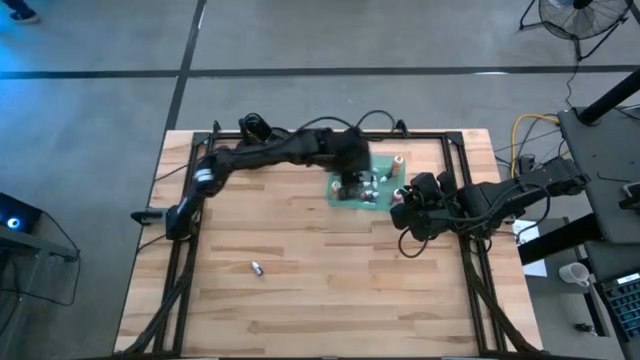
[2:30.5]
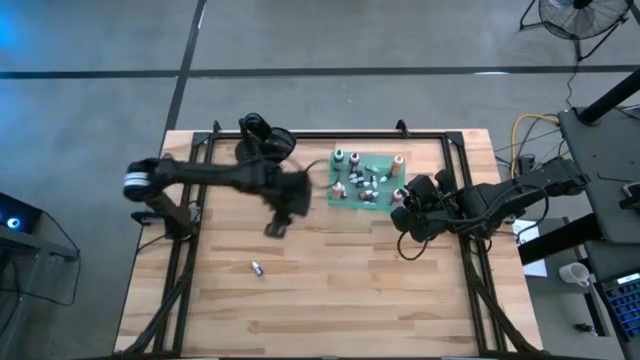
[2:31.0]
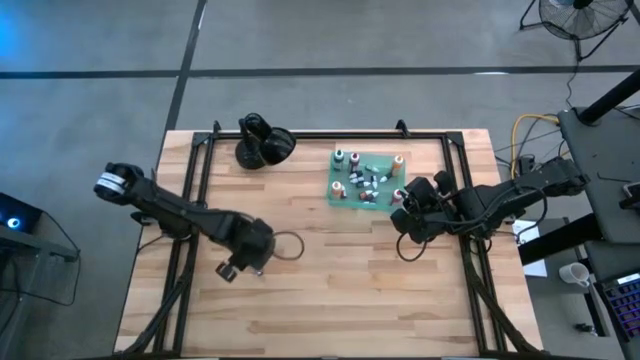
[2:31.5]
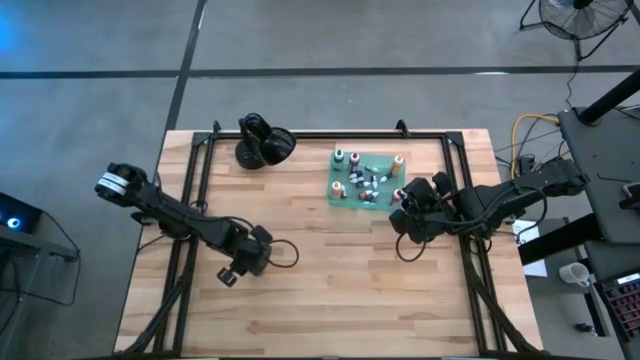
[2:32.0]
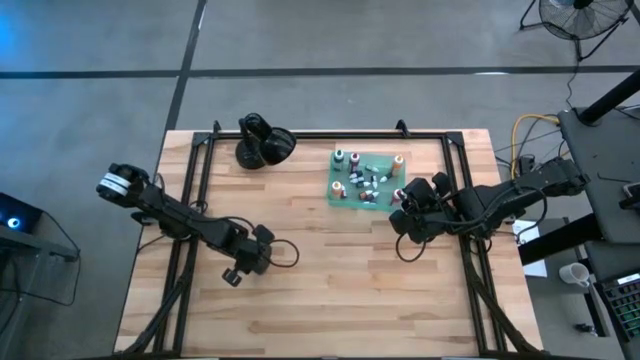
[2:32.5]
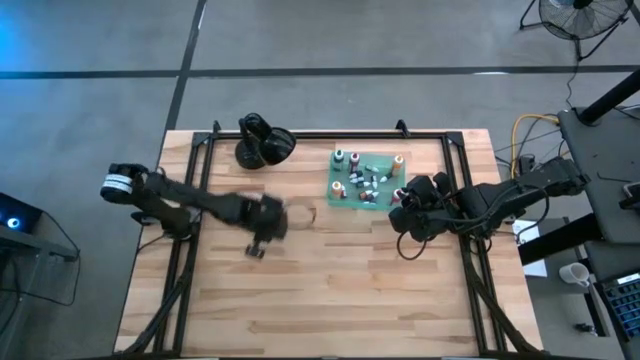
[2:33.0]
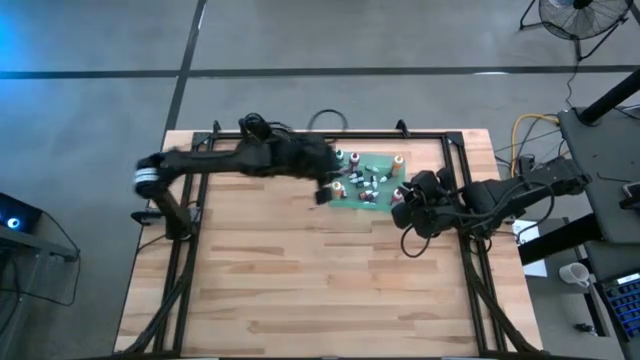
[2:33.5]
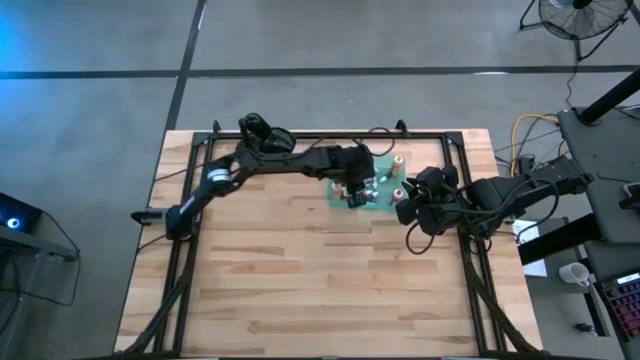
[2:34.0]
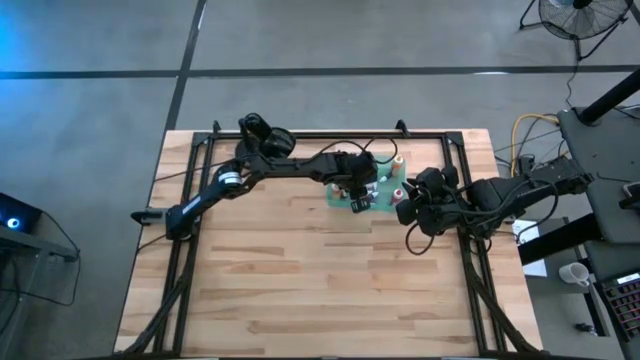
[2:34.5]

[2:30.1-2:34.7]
Task: Pick & Place food coloring
Put the pink food coloring bottle into the green bin

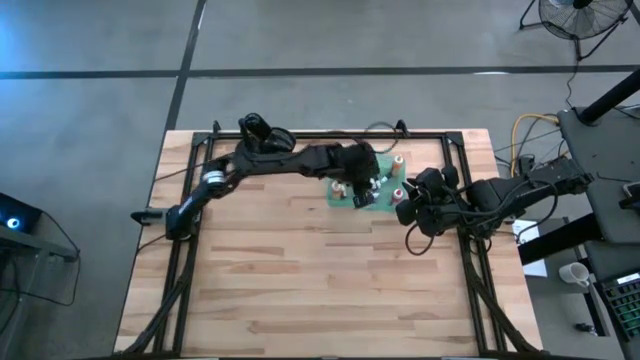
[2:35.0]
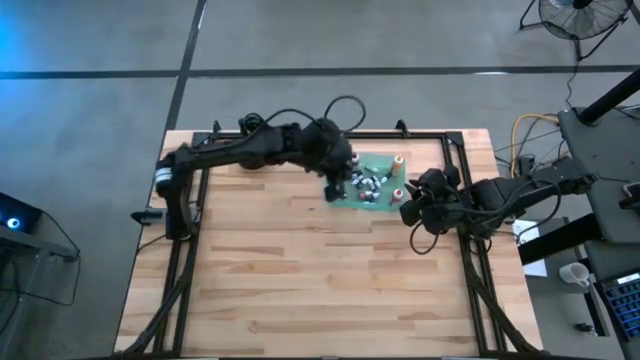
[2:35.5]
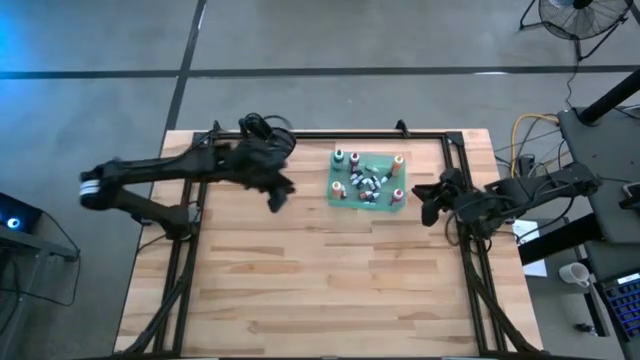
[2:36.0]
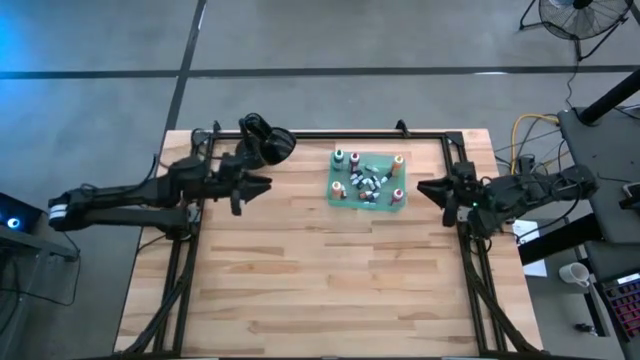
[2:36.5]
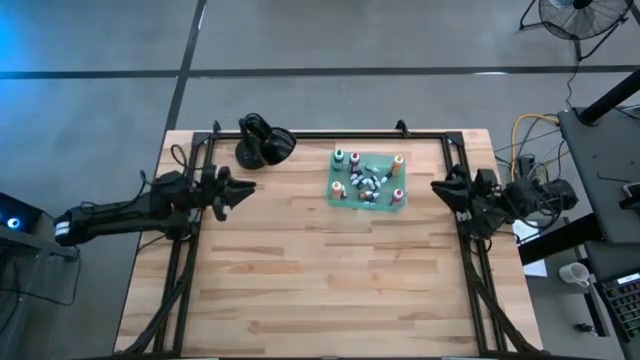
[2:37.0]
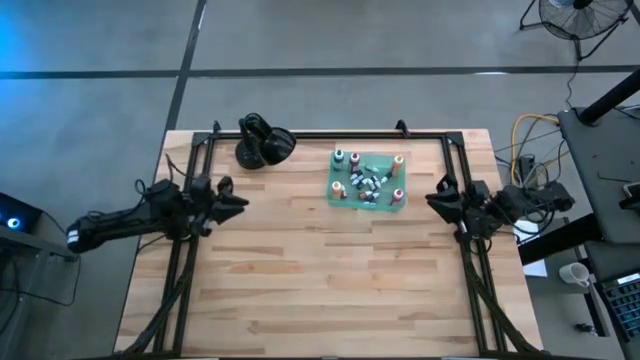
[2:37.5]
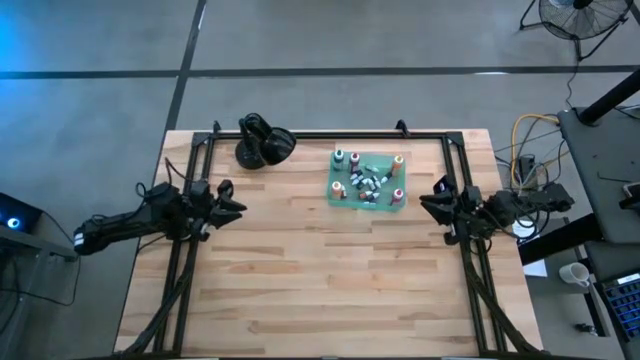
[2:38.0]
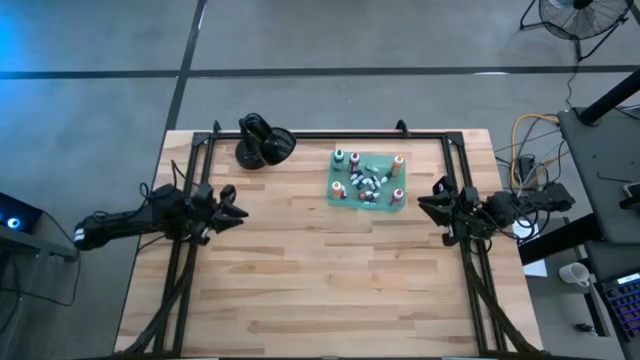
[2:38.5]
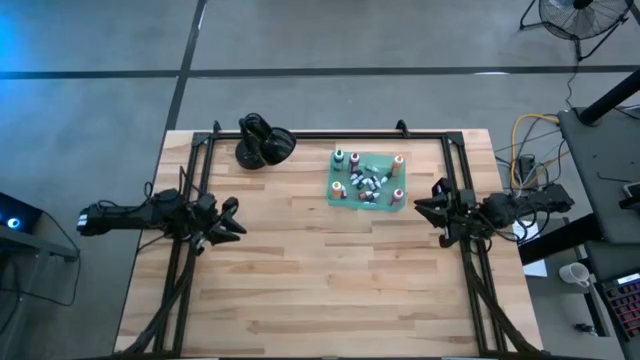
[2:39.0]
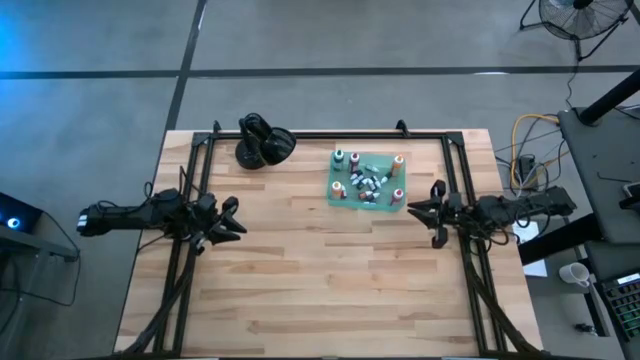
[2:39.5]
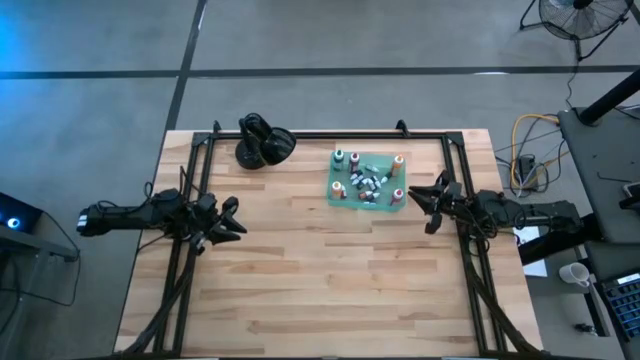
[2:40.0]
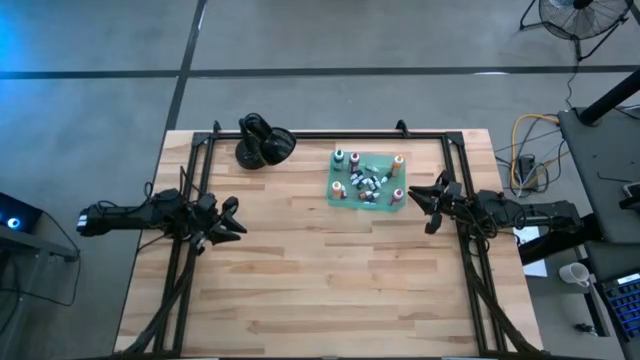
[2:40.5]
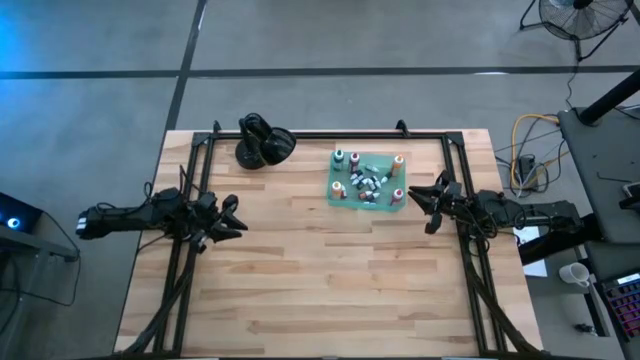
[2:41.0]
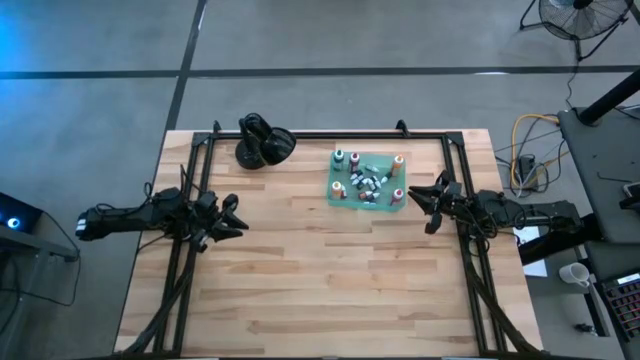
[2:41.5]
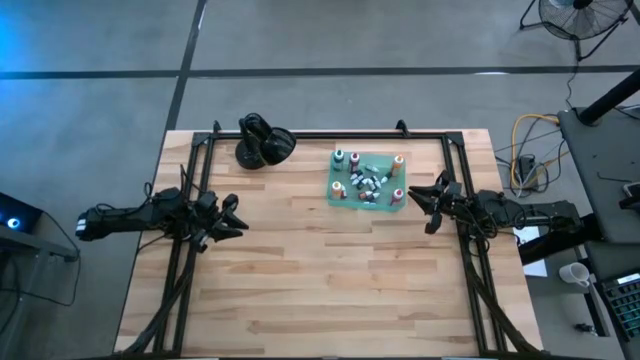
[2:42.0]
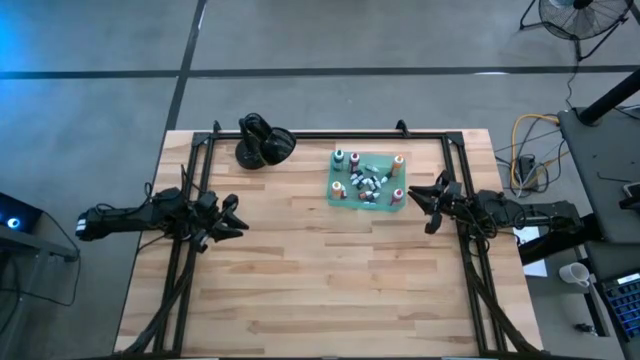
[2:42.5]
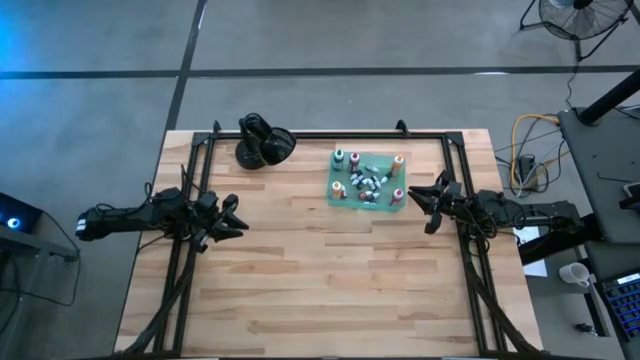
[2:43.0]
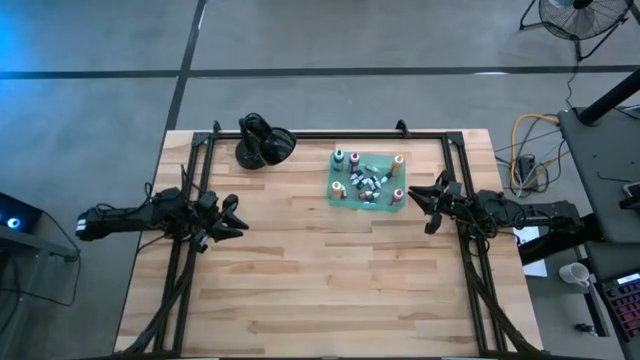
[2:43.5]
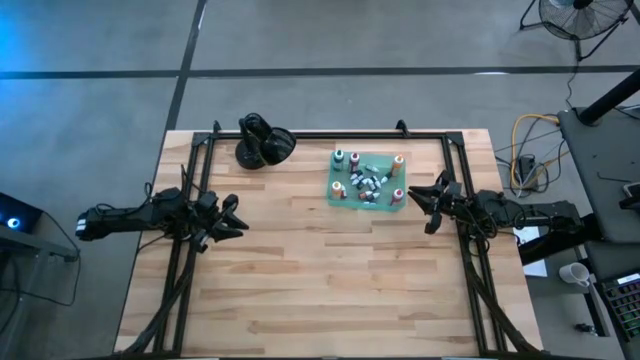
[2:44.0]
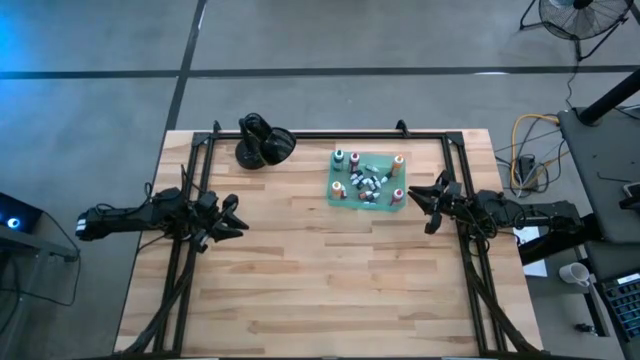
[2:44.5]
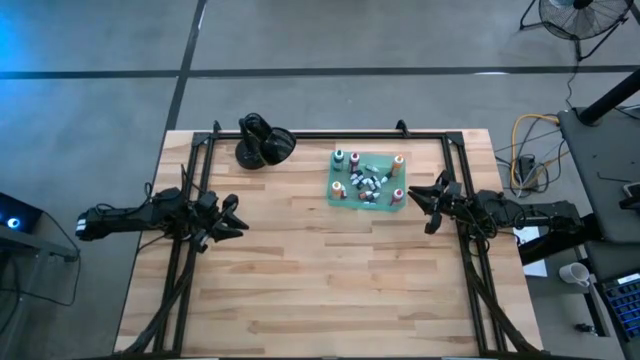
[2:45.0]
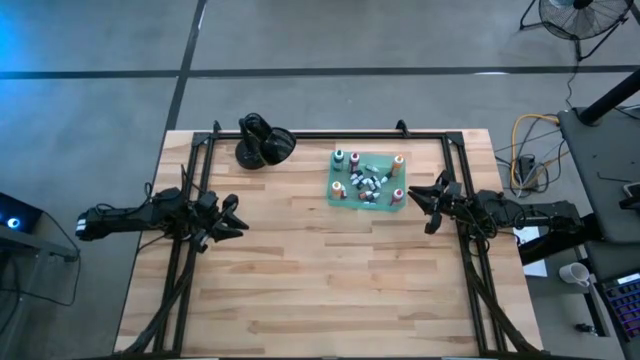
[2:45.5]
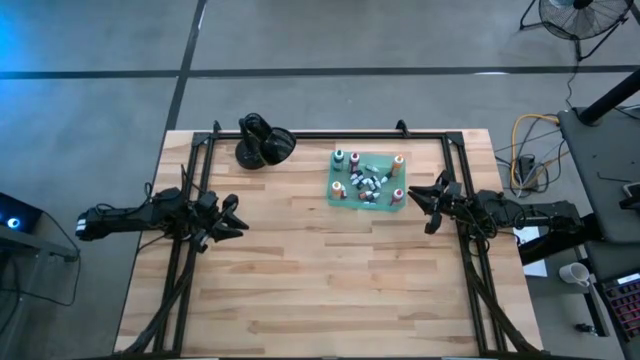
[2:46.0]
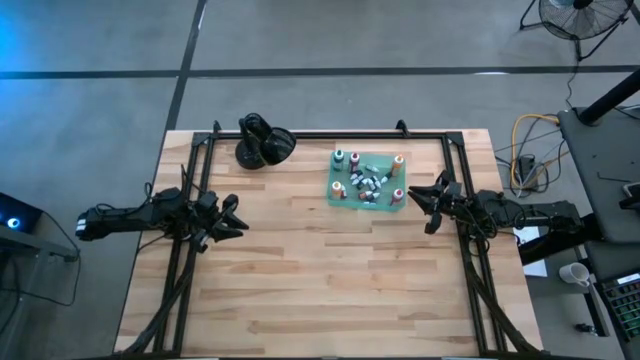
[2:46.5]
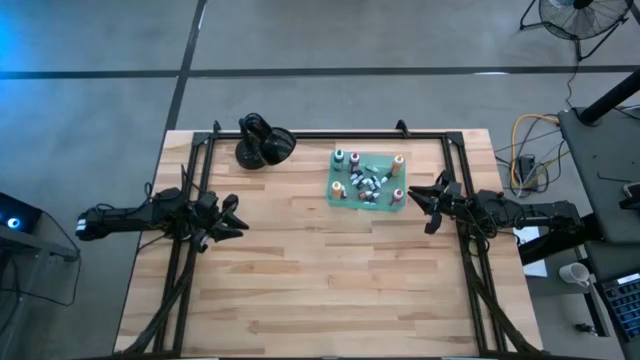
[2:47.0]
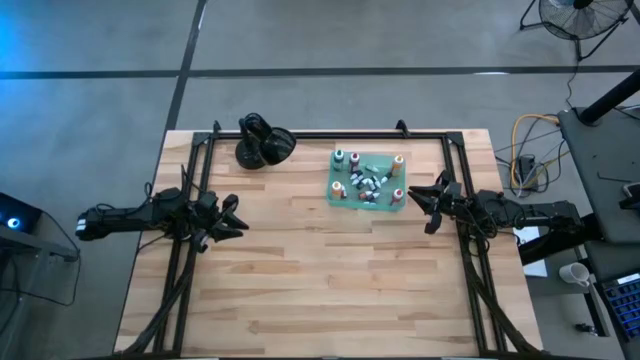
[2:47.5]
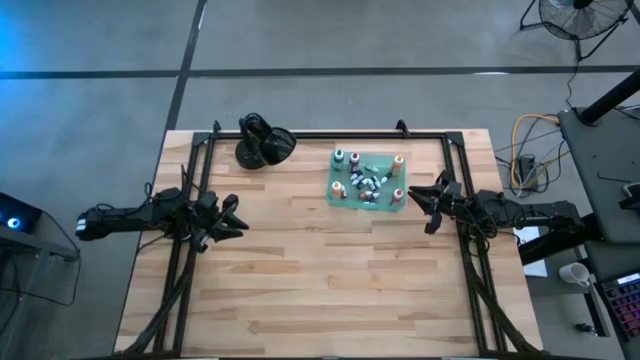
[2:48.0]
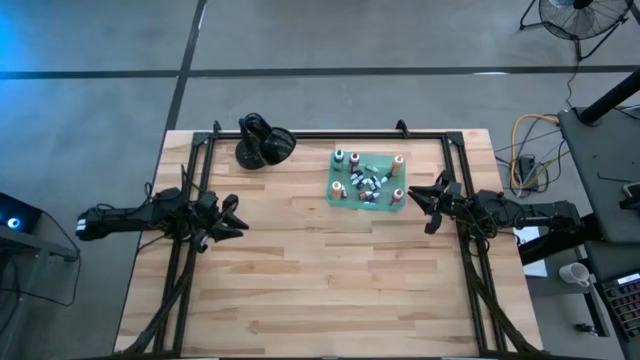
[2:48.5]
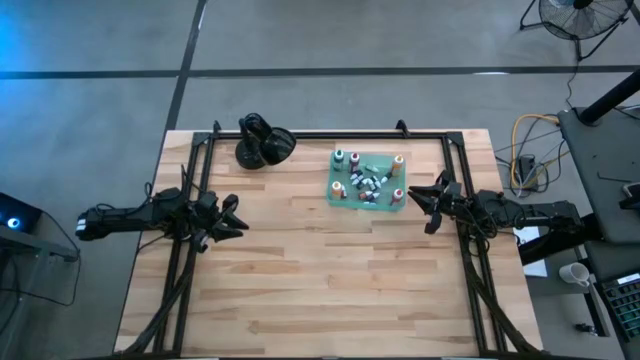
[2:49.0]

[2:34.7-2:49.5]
Return to Home Position

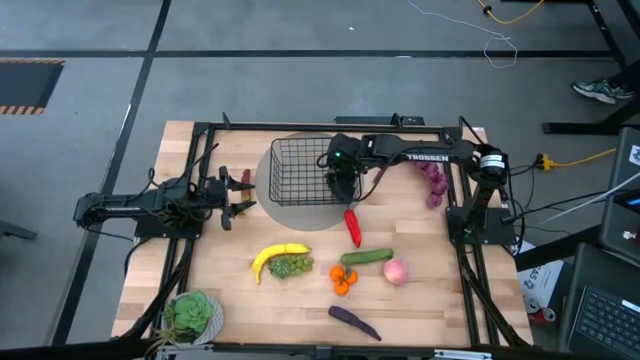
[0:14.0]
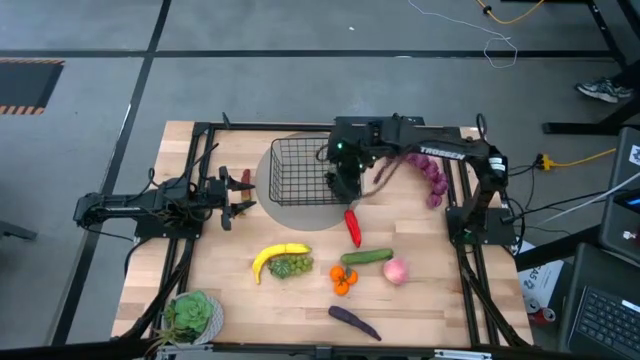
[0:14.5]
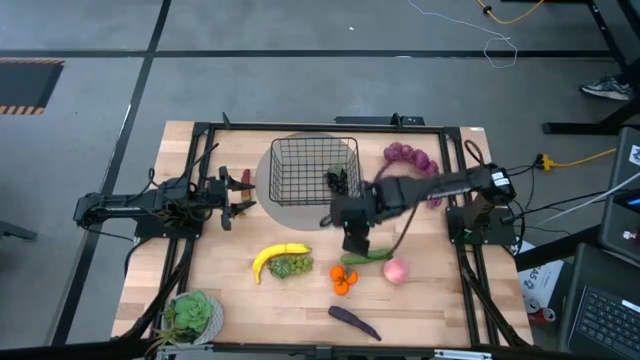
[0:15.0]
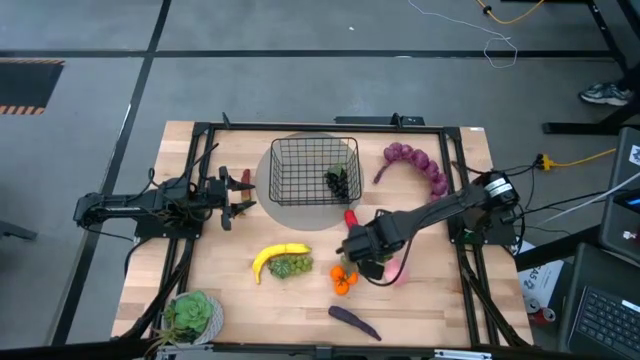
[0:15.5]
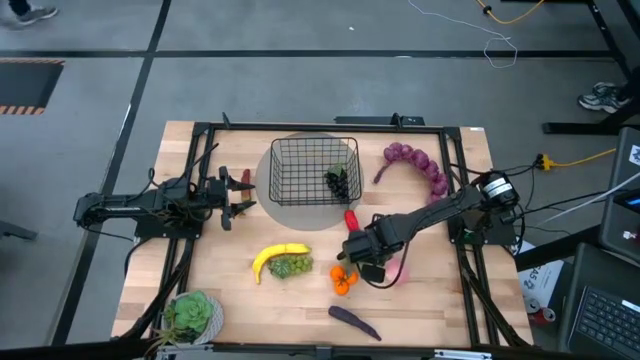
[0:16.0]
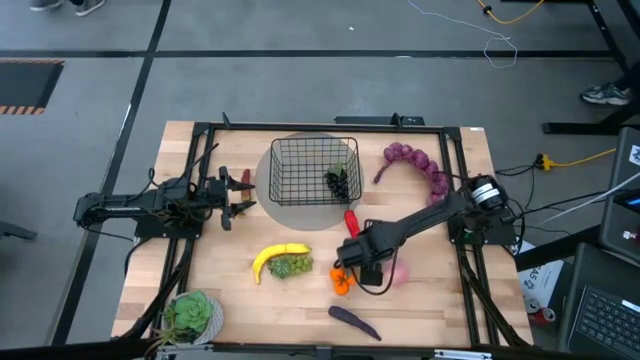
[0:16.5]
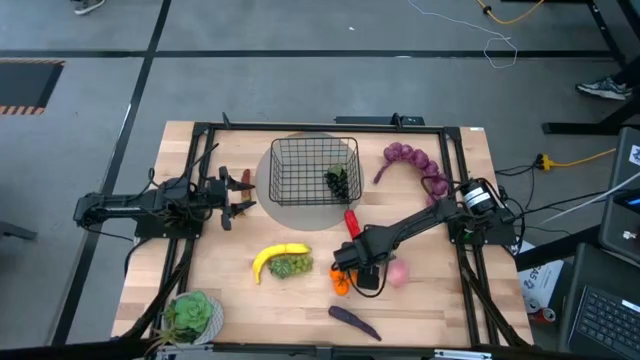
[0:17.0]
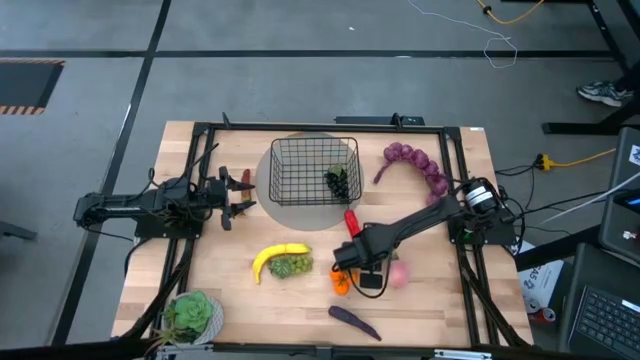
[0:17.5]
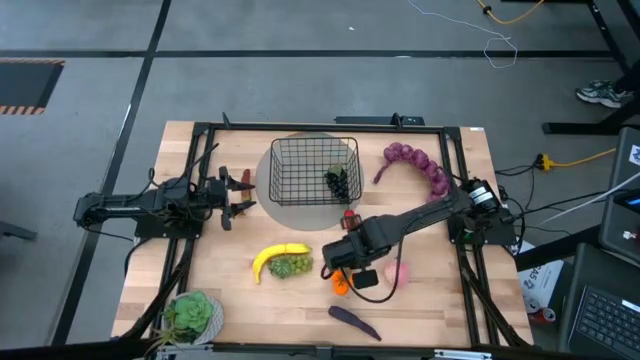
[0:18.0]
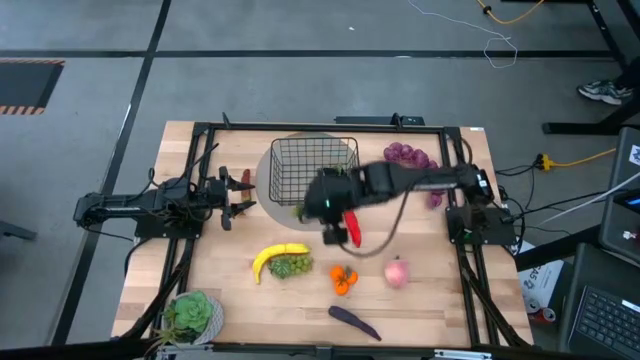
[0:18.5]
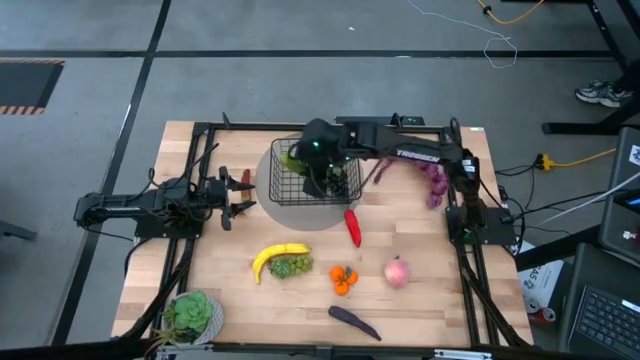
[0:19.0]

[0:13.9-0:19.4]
Task: Build produce basket
Put the green cucumber into the wire basket
